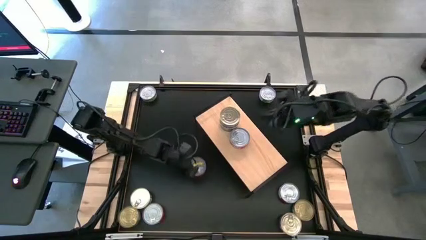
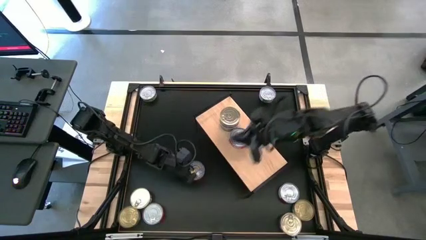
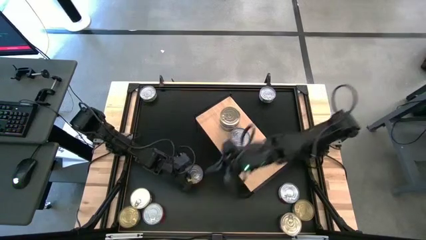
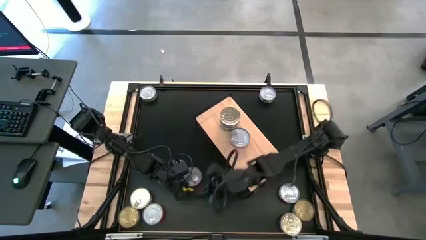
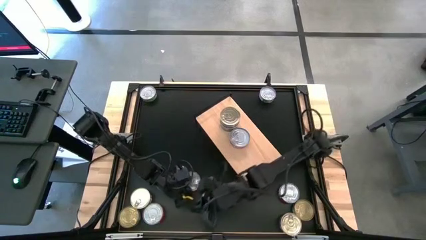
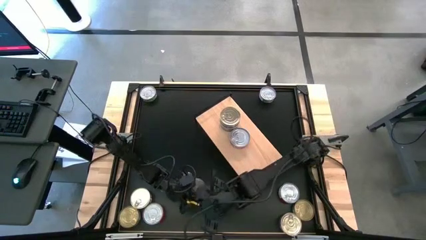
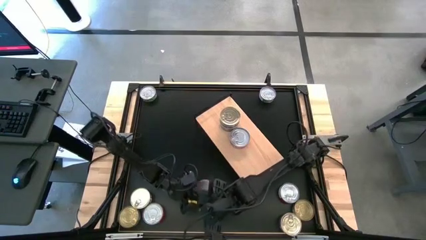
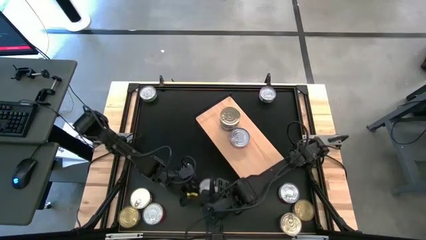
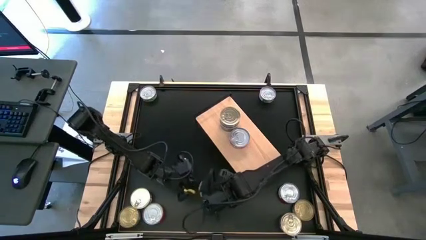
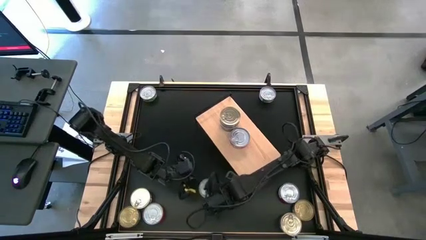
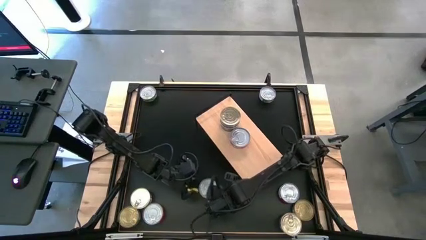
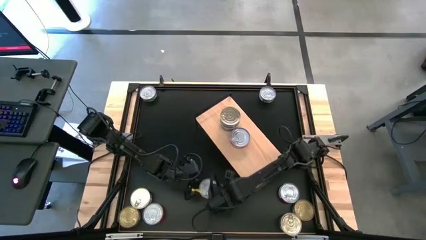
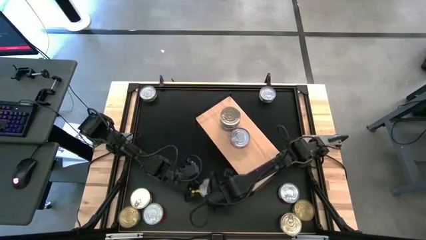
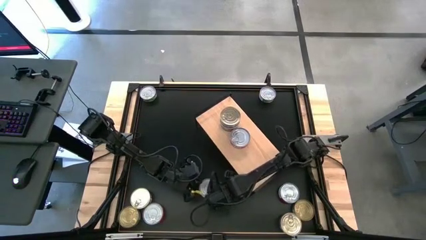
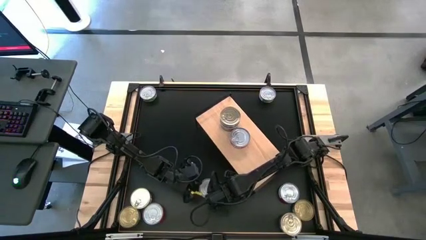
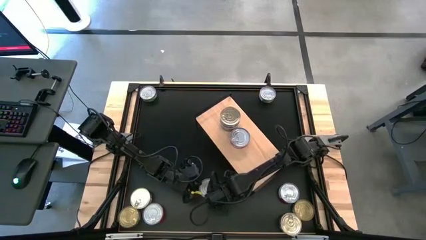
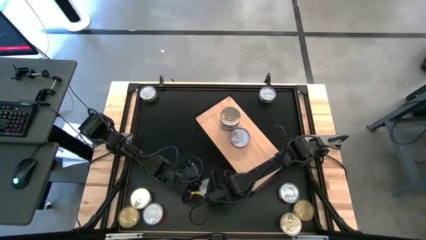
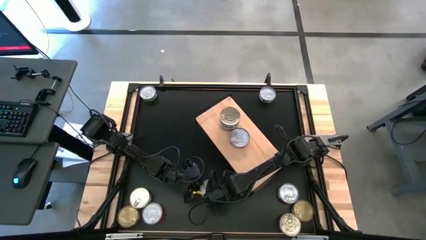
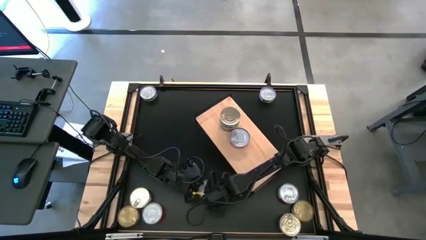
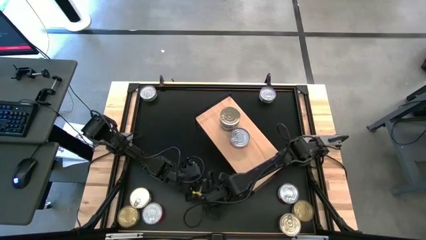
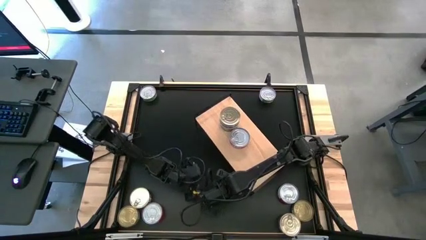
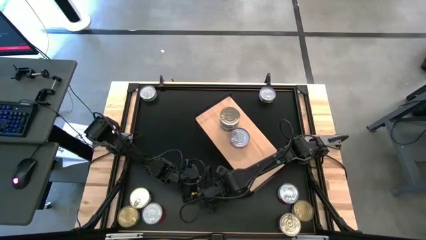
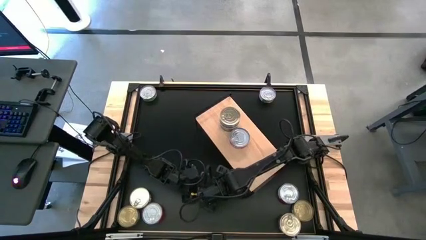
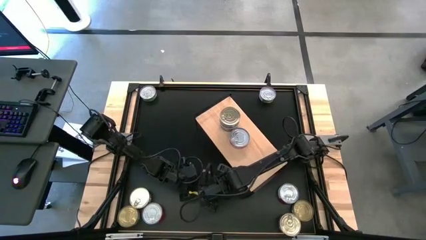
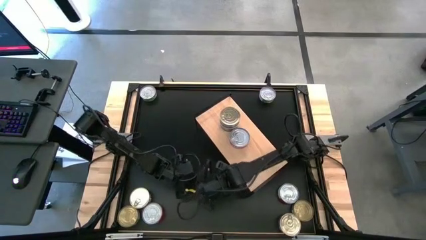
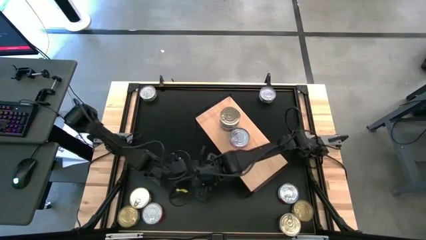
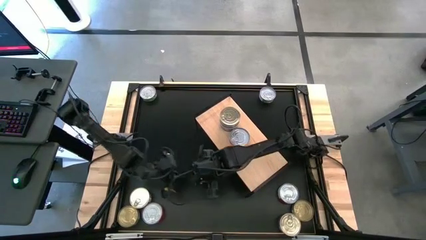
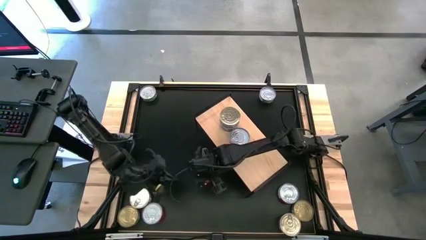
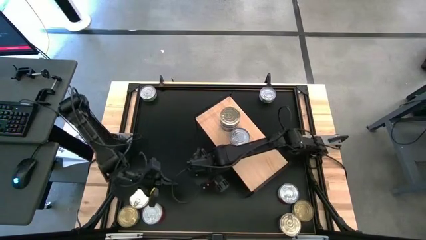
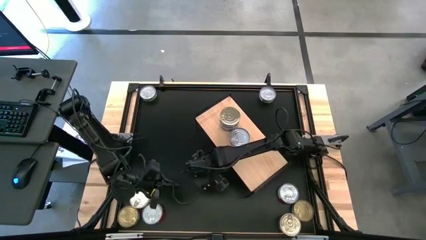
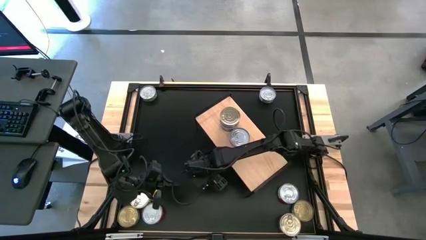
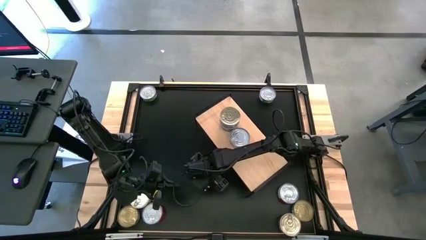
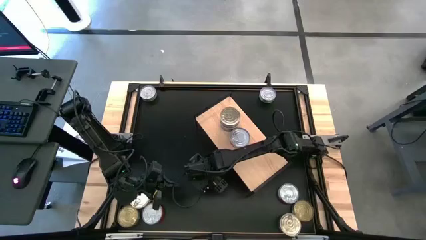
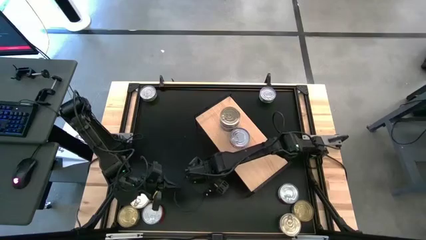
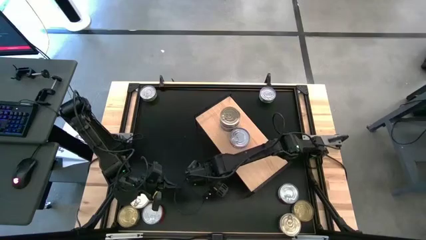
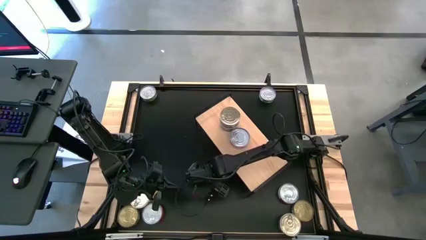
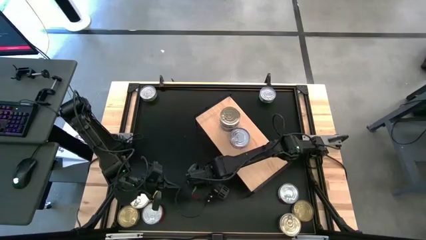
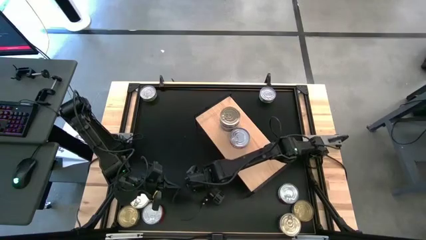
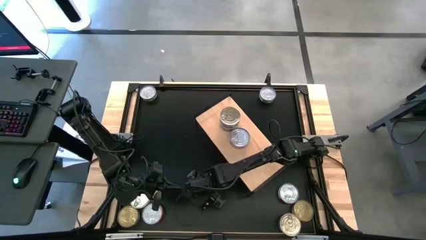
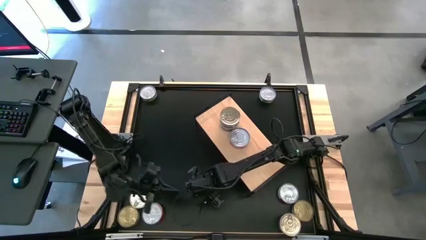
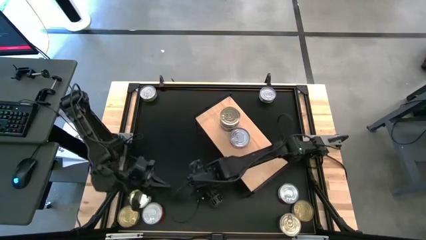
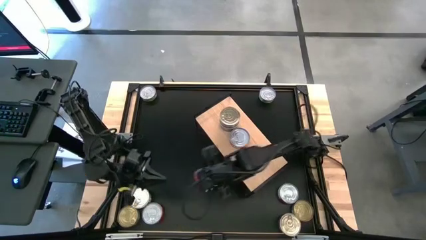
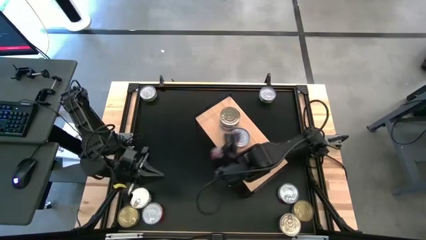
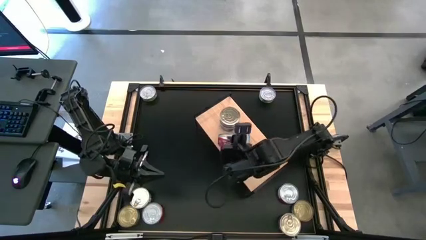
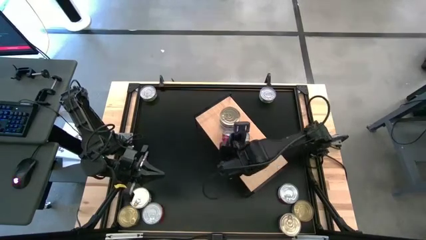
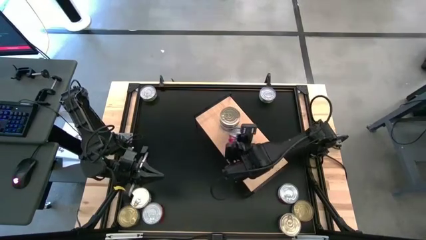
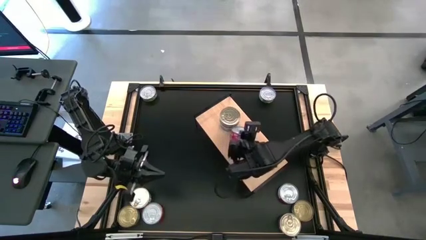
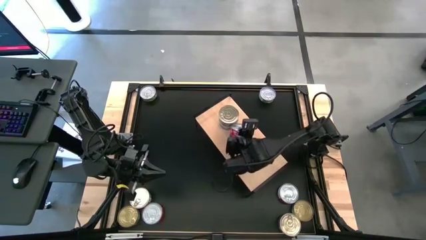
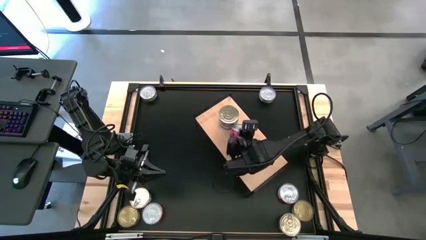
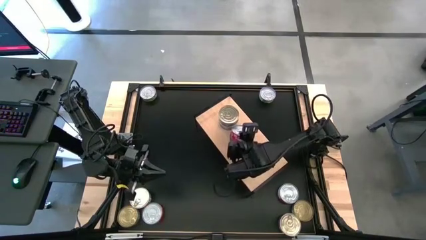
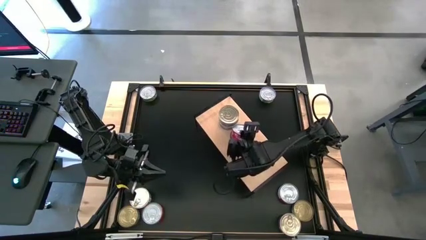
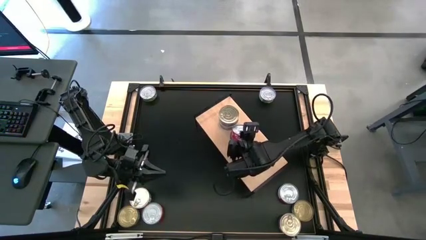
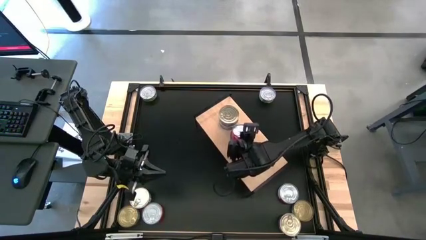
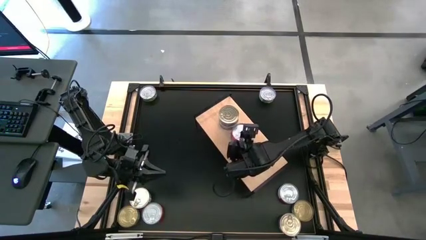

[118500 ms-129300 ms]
Task: Stack canned seafood by type on shelf
Stack the red tuna can on top of the red tuna can on the shelf
